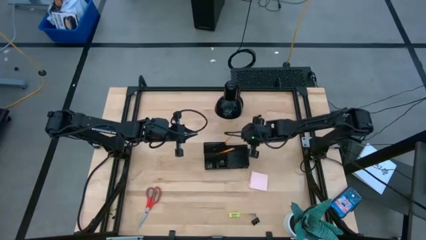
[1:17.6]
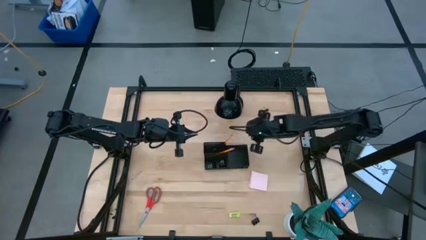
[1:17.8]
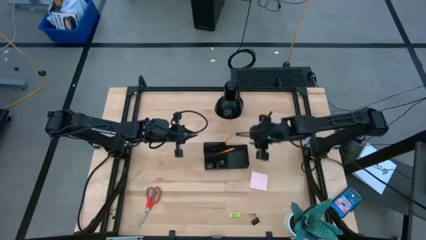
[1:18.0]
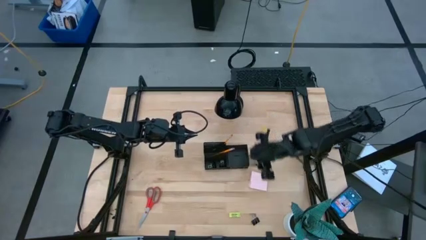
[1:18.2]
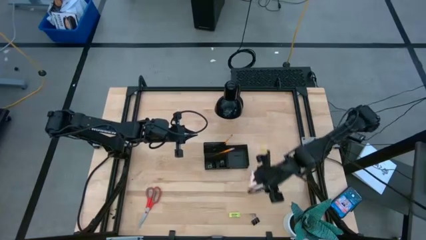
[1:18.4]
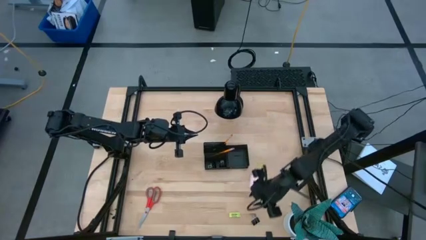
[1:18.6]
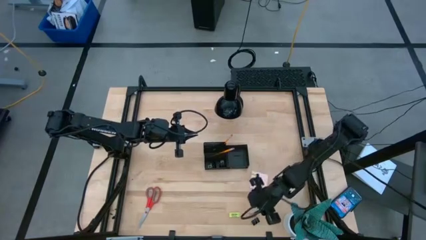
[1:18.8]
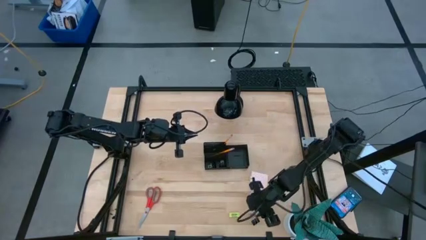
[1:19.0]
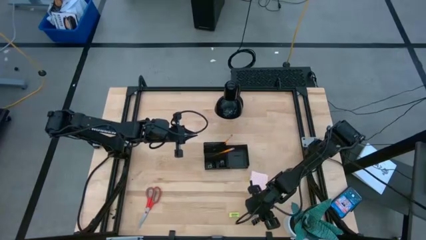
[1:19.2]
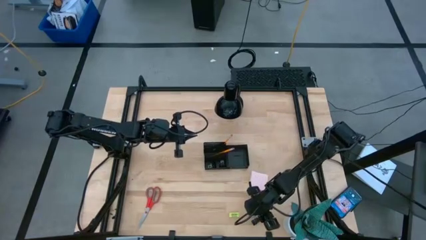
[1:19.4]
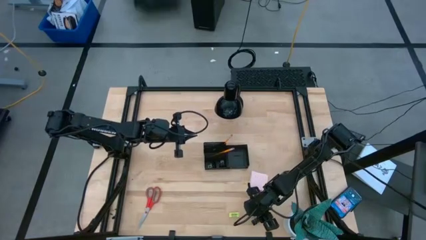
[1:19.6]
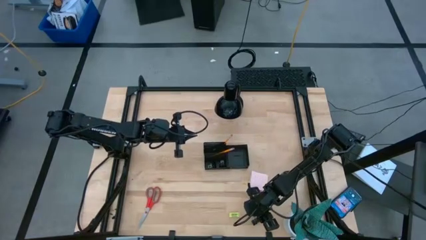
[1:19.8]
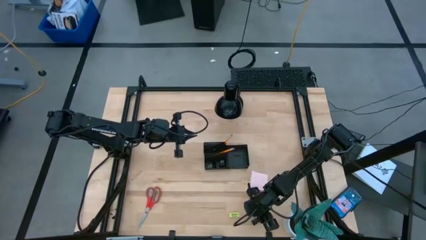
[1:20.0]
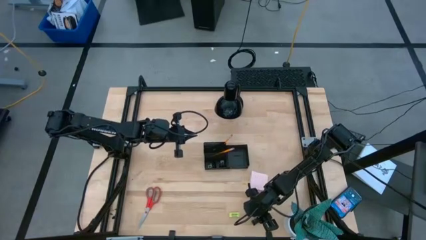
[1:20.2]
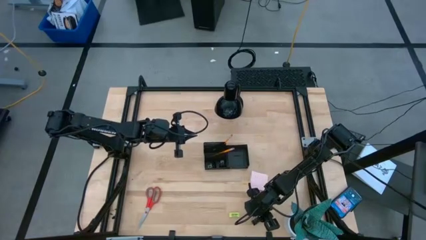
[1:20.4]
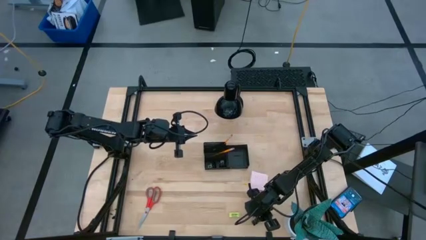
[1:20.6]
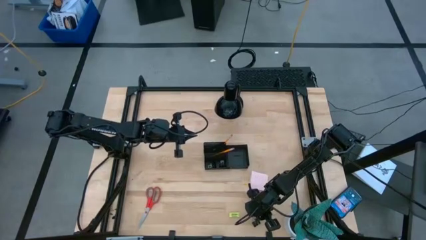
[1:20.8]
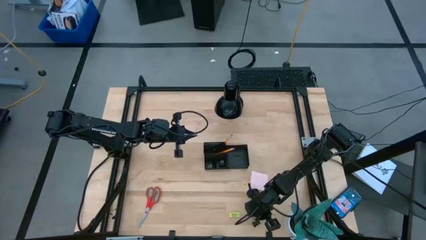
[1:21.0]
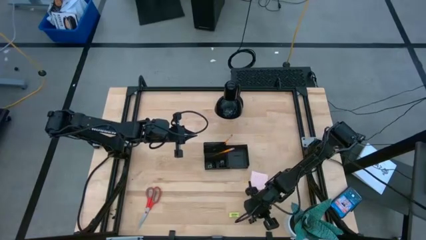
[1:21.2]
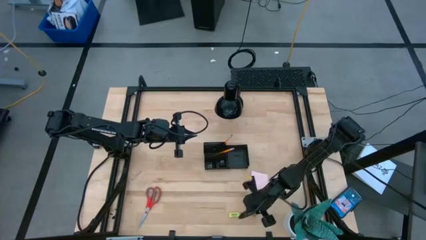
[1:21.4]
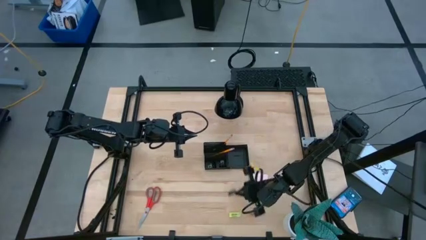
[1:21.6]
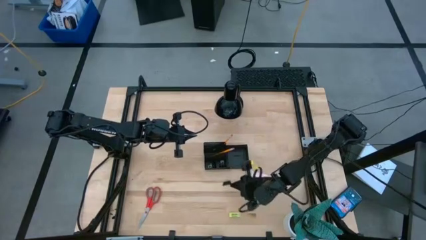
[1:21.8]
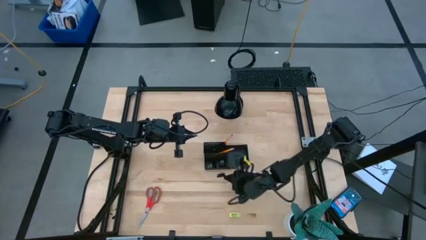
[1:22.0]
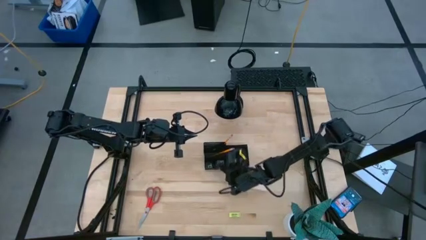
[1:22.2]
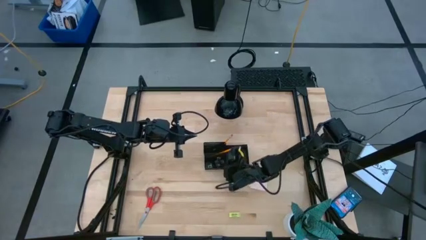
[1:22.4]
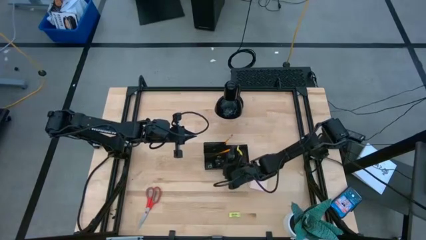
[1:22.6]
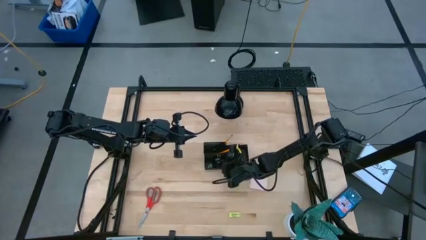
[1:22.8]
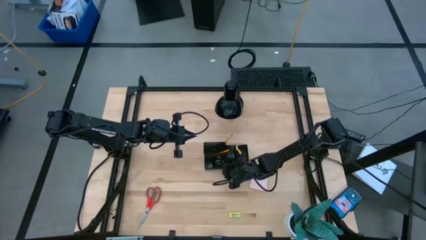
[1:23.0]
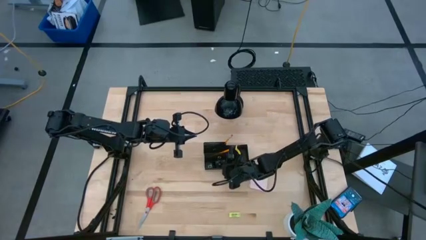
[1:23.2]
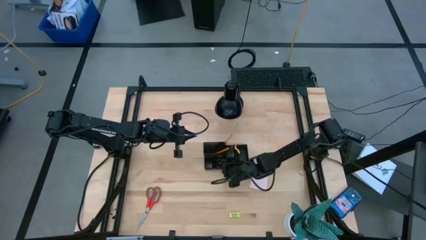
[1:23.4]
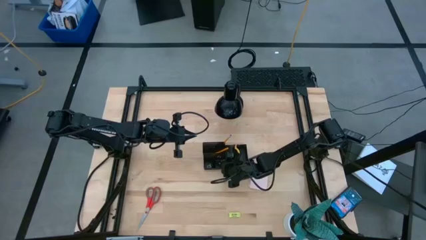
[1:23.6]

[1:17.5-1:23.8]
Task: Pick and place office supplies into organizer
Put the black binder clip into the black desk organizer

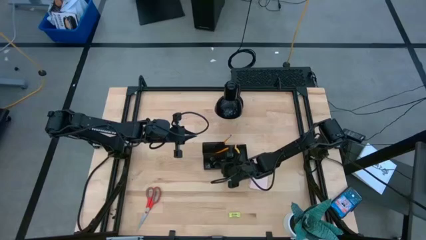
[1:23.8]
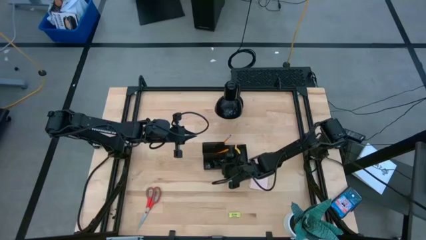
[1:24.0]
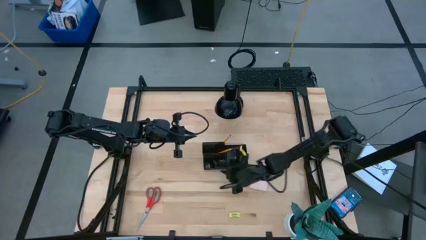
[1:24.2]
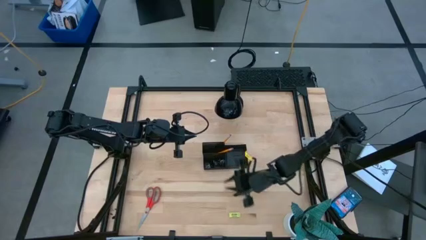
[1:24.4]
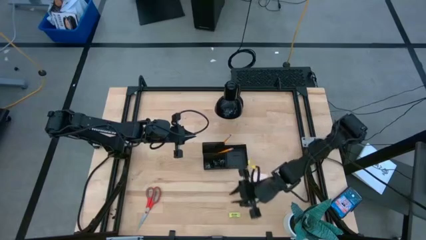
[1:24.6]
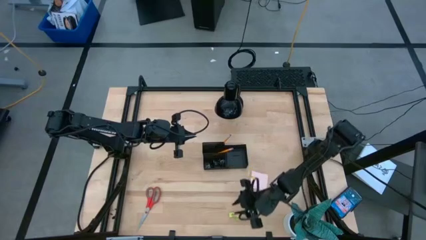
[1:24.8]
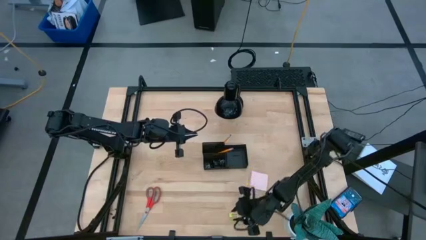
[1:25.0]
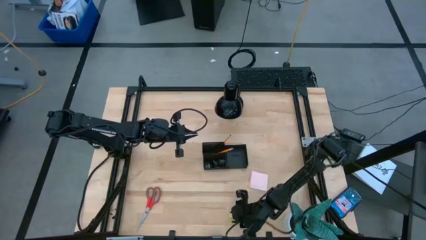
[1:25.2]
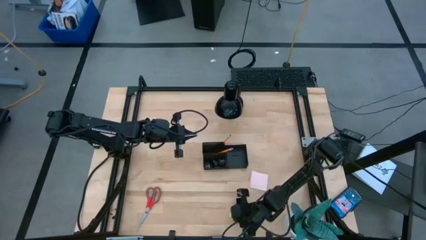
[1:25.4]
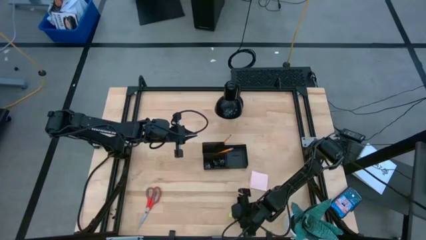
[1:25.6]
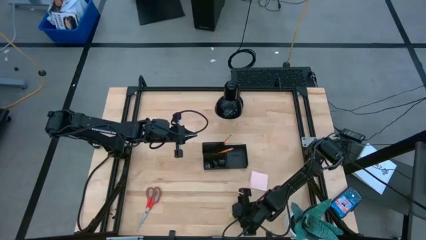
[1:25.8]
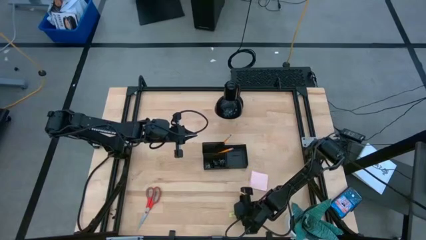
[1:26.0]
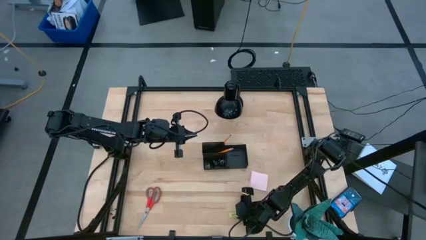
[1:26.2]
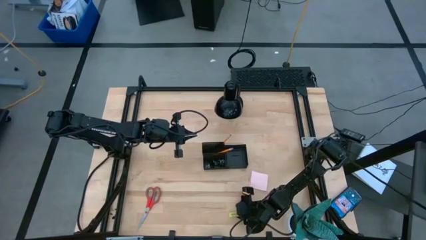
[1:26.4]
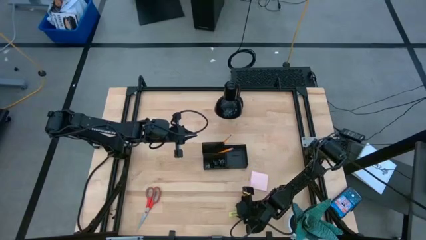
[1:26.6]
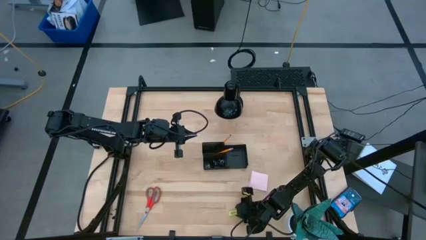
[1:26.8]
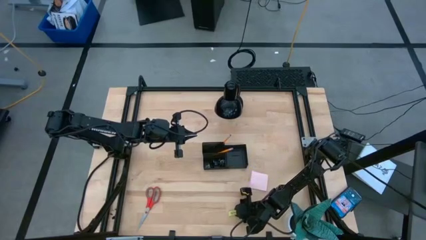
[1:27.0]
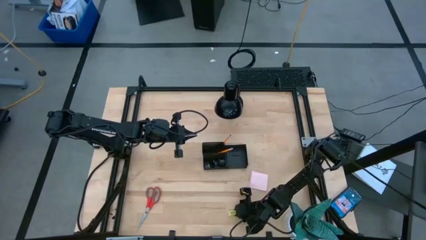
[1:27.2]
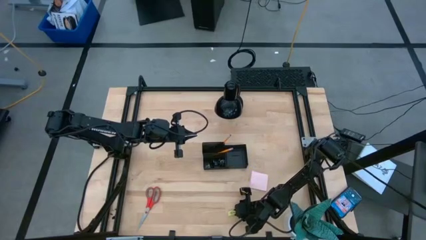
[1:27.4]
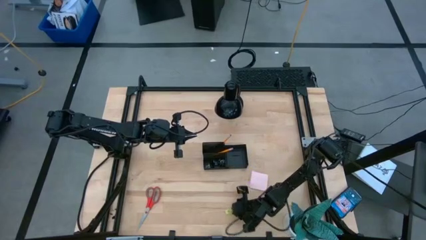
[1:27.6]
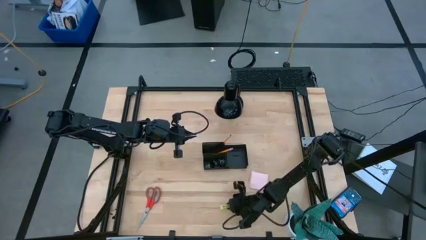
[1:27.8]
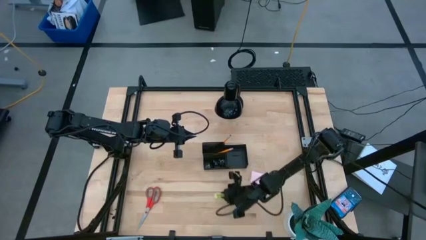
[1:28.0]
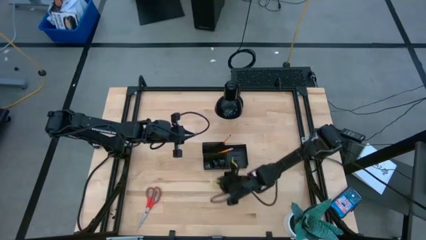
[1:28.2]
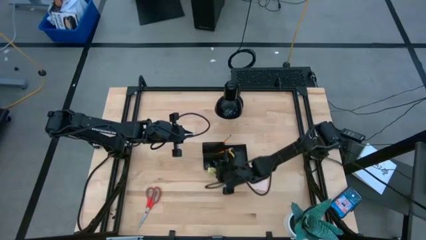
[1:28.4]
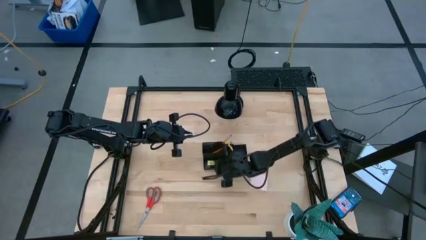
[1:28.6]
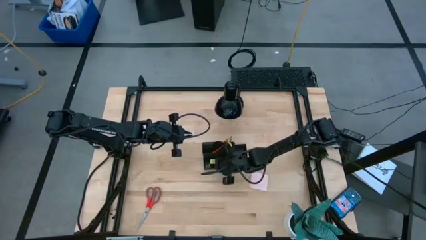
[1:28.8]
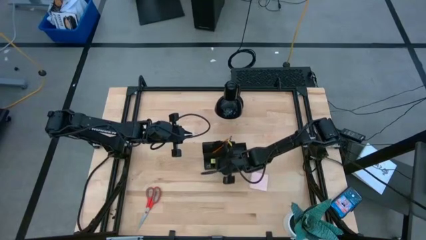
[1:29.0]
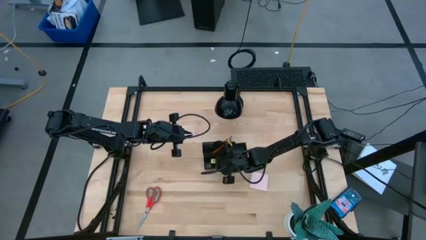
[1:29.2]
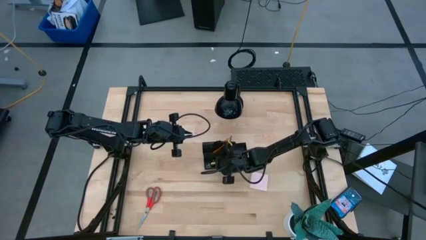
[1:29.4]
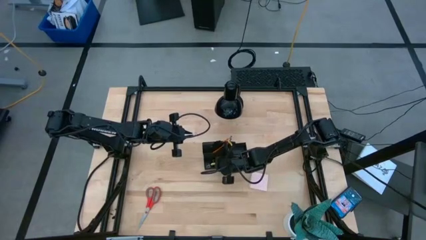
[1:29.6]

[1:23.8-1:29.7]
Put the yellow eraser into the black desk organizer

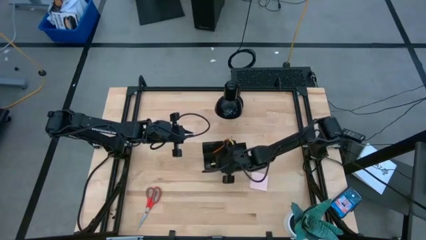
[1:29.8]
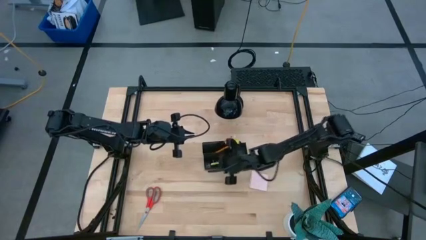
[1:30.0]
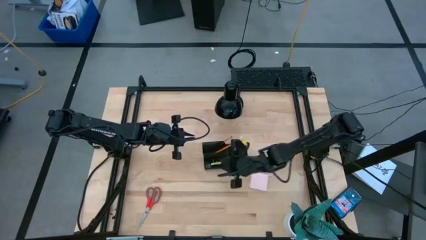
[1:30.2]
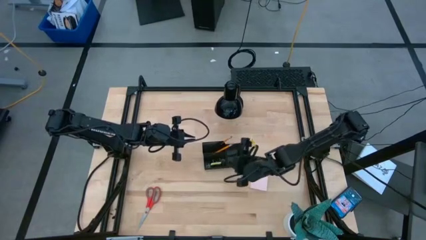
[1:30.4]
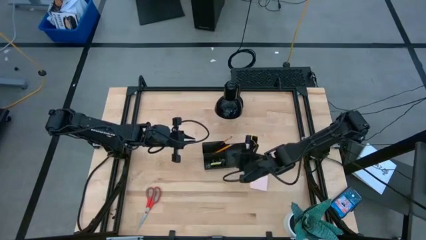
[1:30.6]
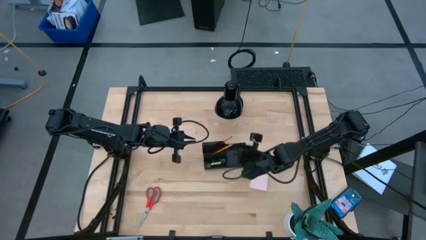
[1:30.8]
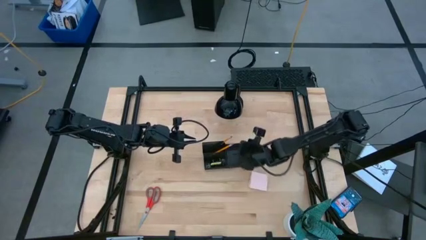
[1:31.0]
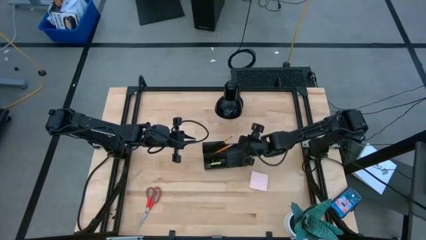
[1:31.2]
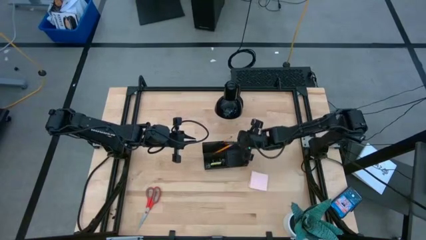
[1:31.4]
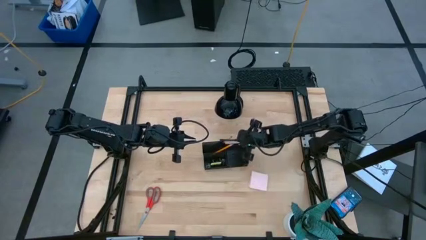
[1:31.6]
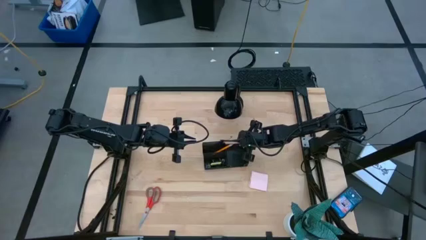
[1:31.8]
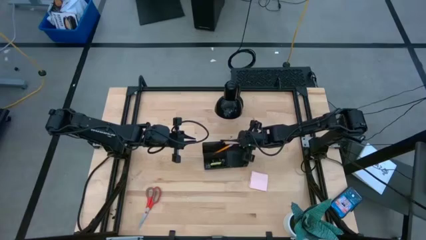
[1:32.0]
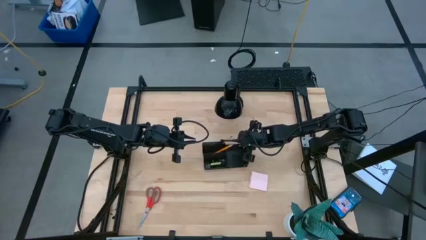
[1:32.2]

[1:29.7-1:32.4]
Adjust the black desk organizer

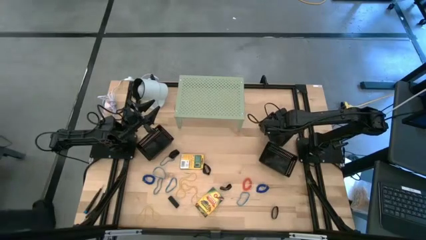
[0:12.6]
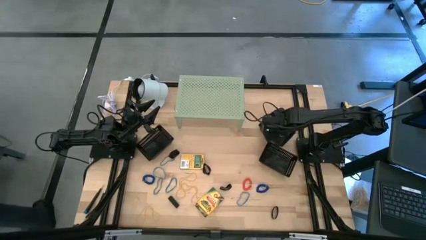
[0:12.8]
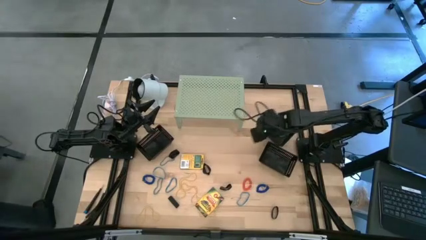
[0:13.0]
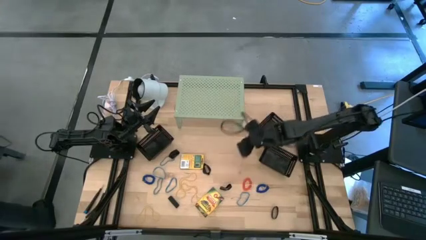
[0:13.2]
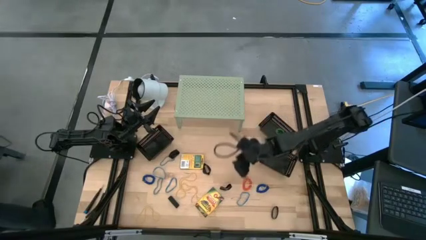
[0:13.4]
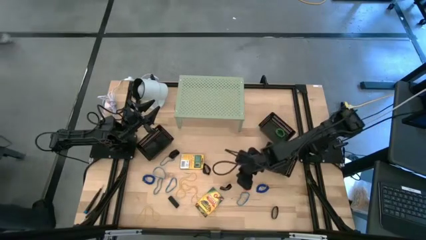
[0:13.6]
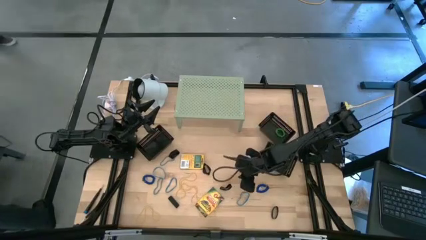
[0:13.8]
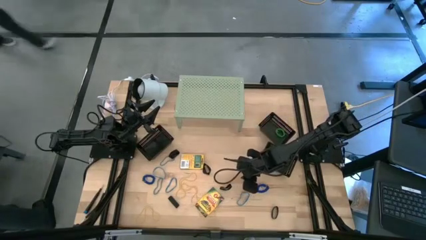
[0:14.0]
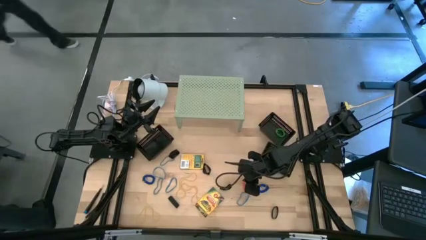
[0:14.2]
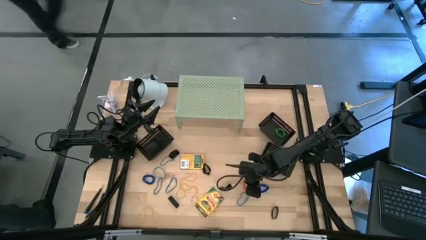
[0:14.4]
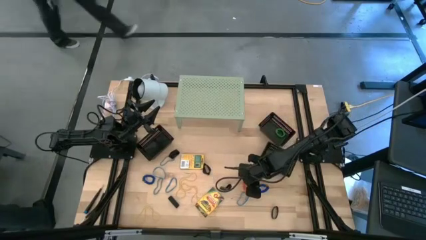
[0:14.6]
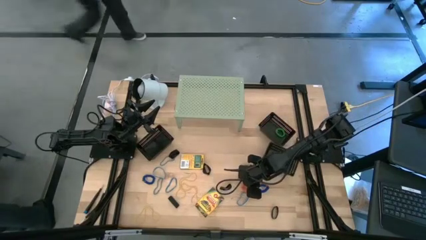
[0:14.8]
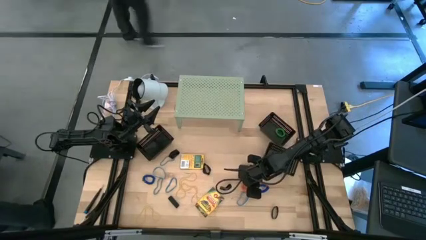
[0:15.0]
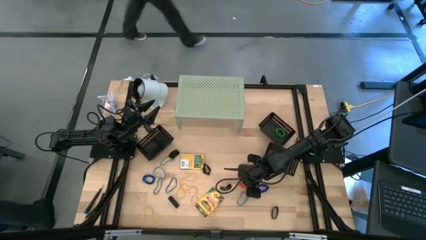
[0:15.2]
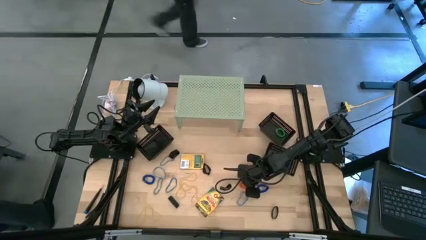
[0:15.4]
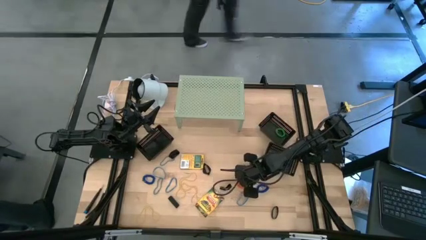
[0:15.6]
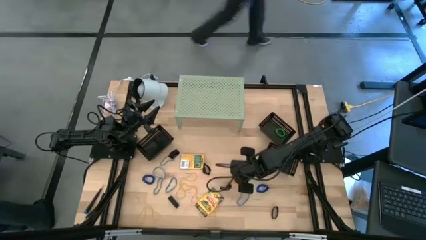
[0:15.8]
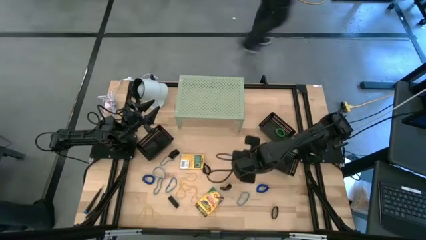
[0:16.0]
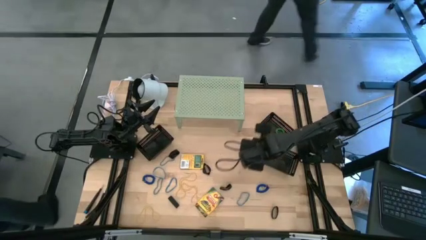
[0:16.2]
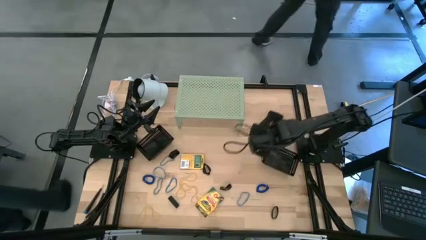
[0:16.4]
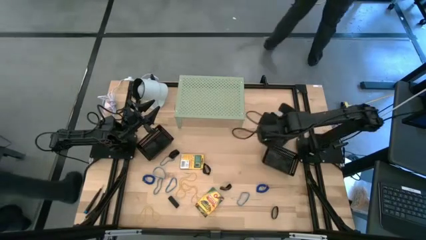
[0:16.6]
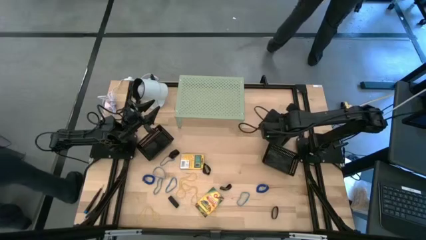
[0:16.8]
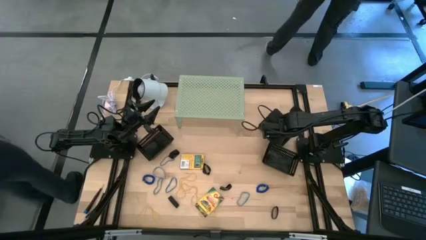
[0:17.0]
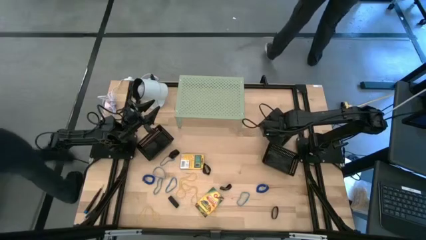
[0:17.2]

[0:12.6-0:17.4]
Task: Pick & Place Office Desk Supplies
Put the orange spring keychain into the top black bin
